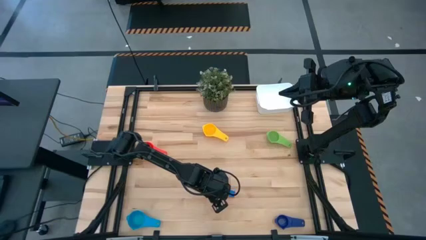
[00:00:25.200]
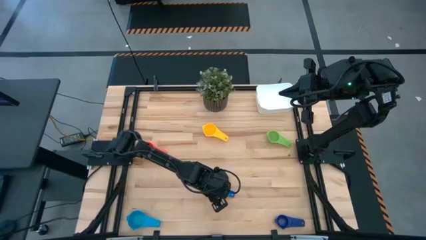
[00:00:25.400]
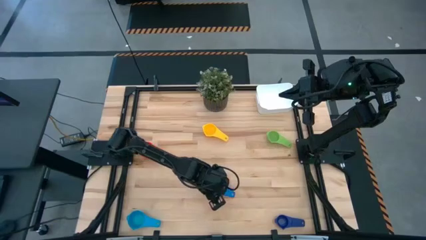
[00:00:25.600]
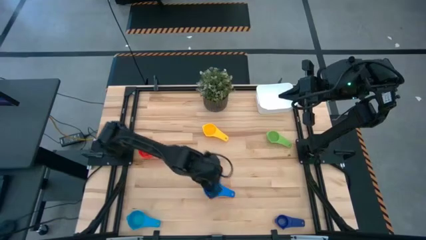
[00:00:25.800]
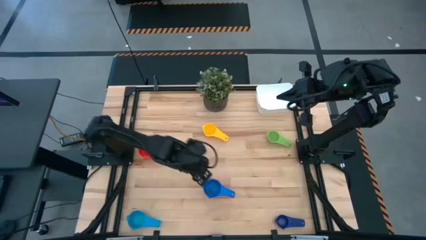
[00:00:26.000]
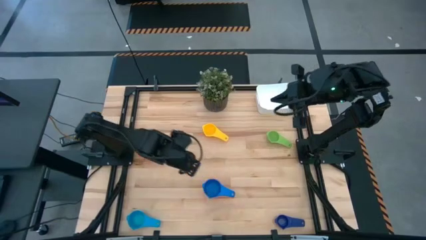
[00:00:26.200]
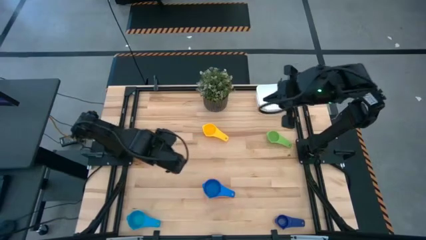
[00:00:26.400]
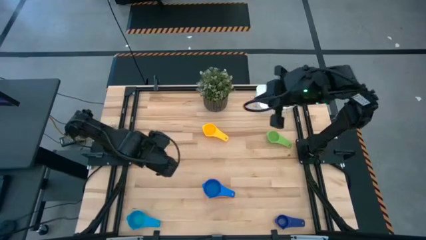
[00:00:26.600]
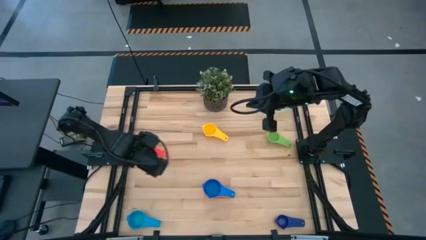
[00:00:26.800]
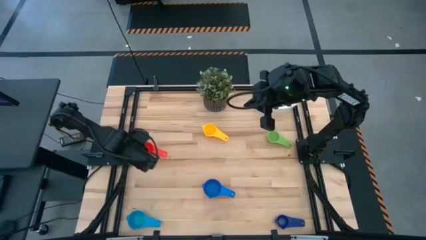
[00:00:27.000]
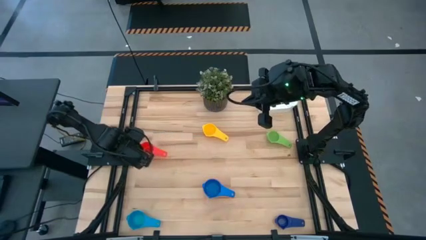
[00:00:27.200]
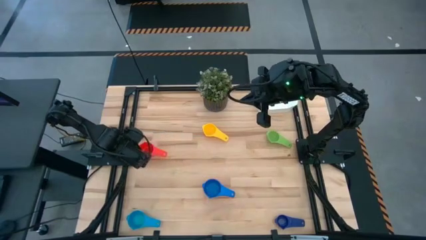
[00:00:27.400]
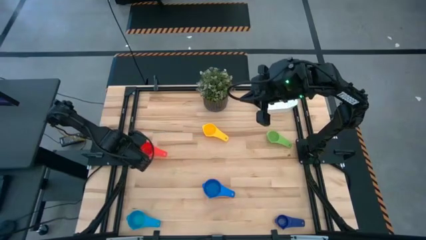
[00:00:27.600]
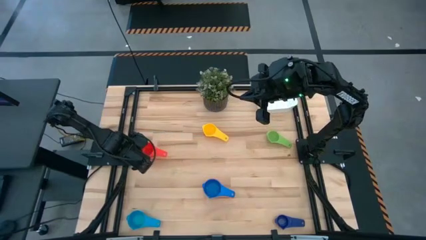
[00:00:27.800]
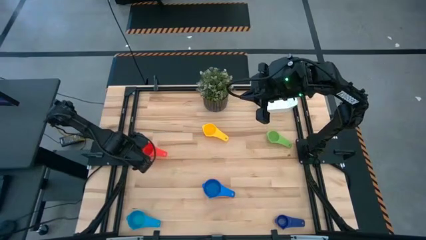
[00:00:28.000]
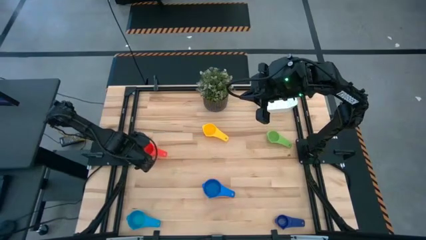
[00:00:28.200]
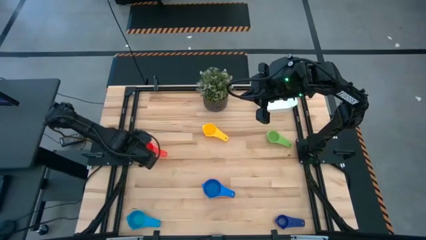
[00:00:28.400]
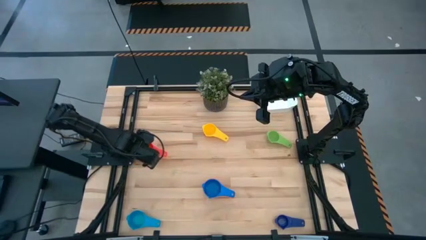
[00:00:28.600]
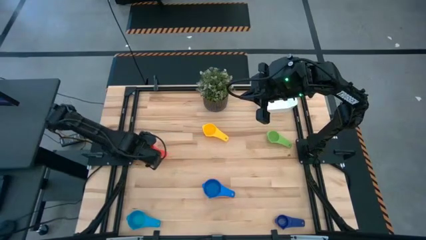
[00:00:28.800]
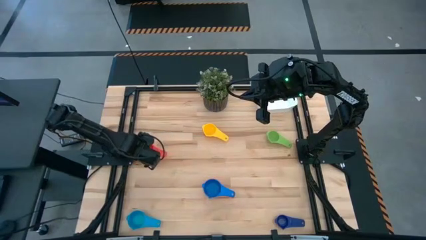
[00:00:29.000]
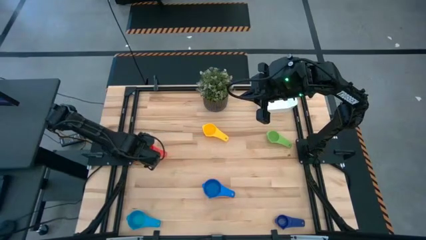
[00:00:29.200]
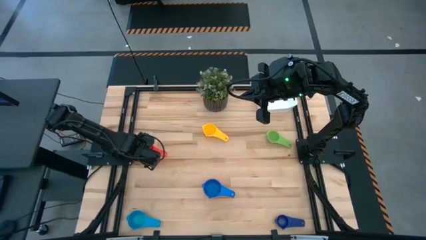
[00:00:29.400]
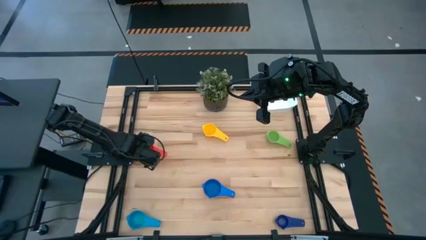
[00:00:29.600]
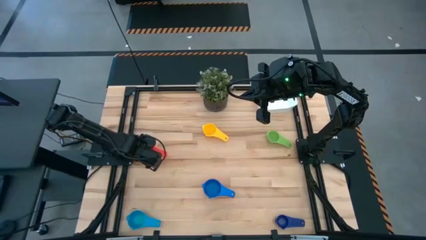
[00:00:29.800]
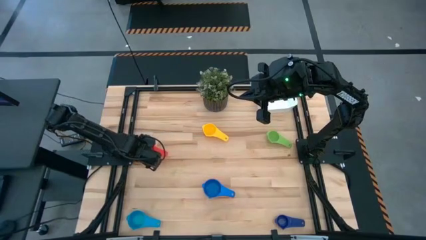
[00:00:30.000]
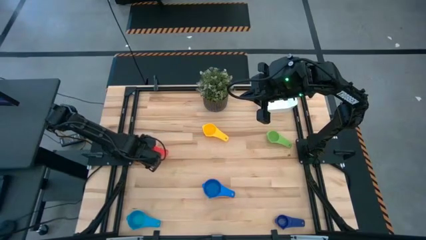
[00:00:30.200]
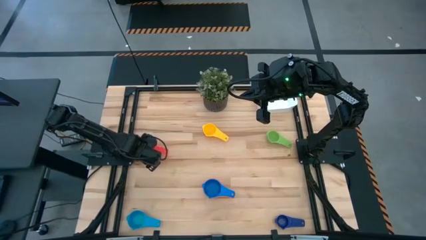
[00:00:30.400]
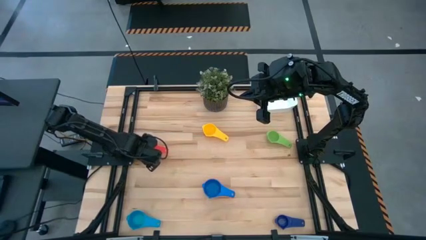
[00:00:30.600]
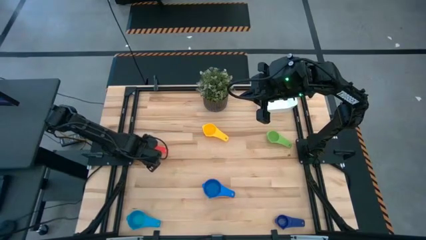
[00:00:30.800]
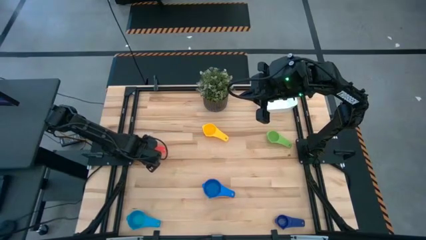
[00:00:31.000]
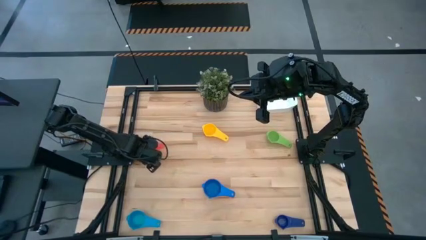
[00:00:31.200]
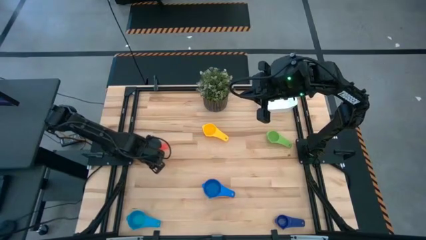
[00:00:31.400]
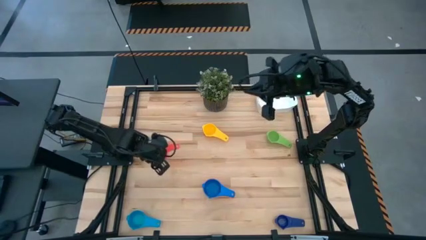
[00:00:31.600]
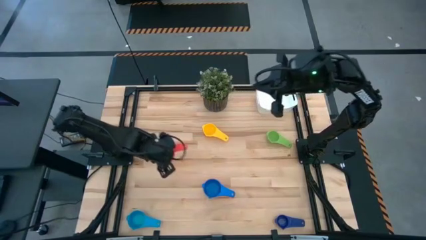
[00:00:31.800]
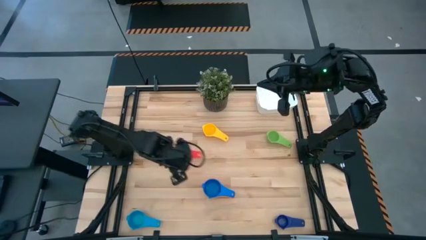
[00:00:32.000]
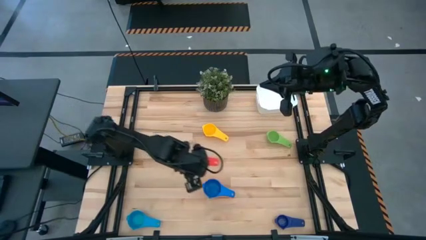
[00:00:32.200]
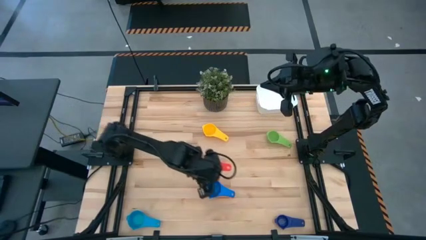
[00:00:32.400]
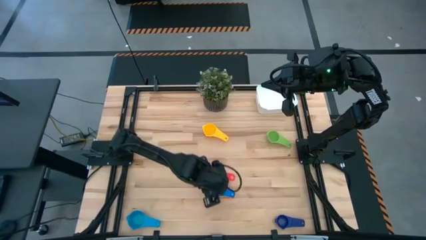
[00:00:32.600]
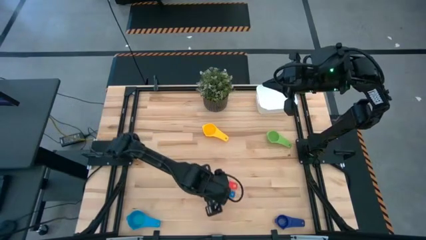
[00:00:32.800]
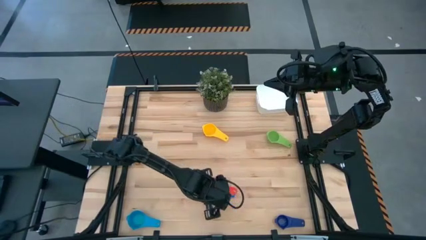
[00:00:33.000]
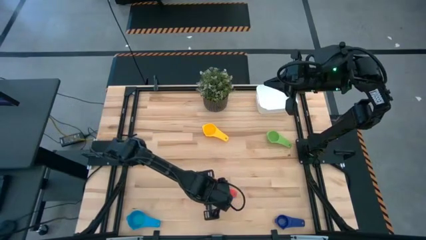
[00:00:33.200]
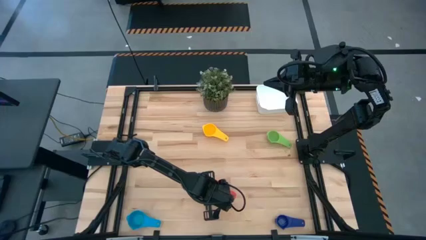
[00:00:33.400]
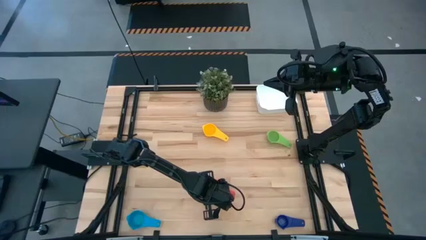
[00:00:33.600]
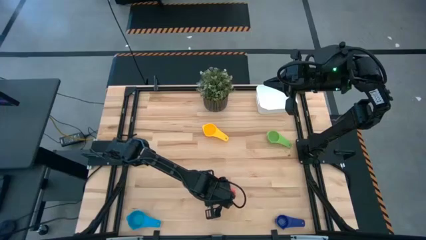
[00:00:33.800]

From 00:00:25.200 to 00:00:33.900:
Task: Nest measuring cups in basket
Stack the red measuring cup on top of the blue measuring cup

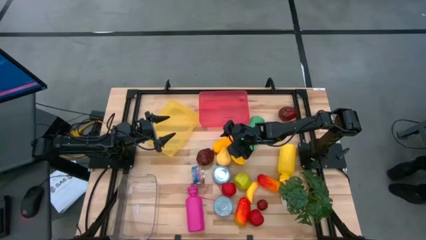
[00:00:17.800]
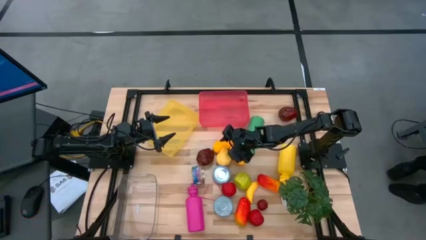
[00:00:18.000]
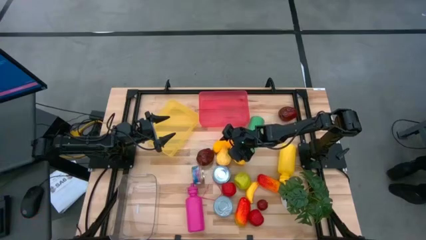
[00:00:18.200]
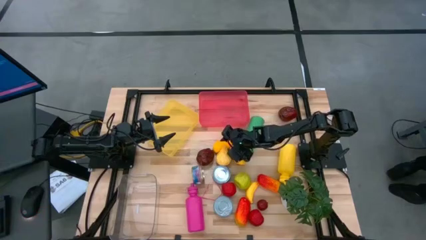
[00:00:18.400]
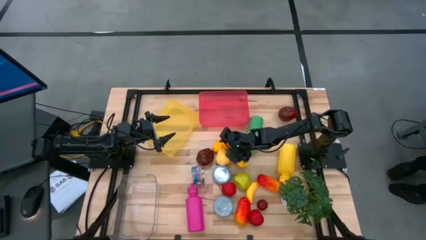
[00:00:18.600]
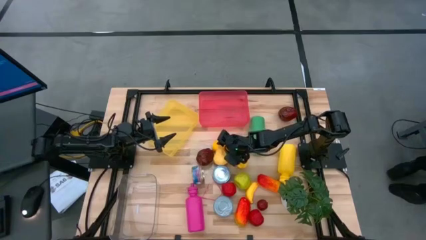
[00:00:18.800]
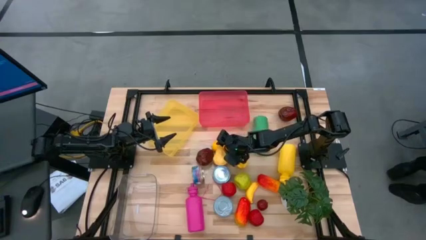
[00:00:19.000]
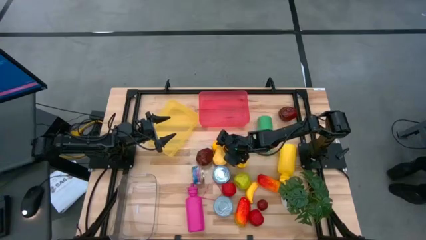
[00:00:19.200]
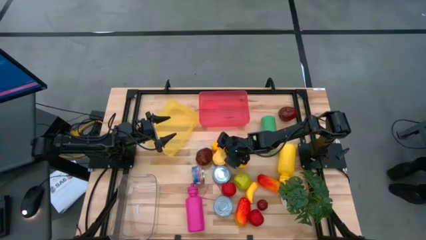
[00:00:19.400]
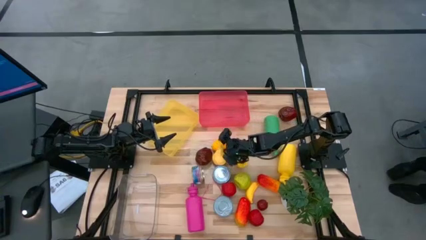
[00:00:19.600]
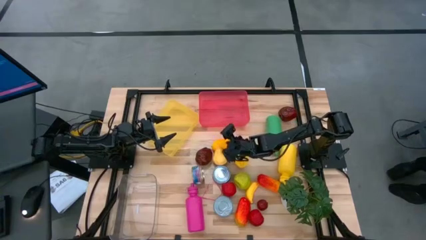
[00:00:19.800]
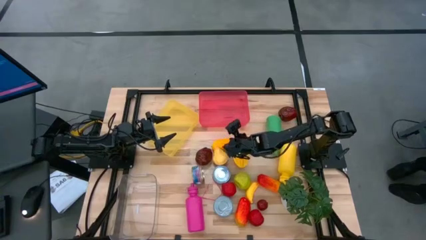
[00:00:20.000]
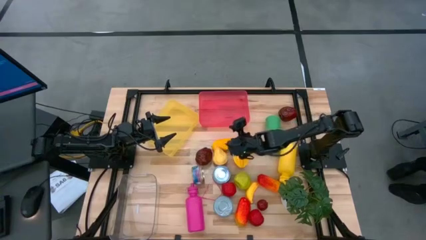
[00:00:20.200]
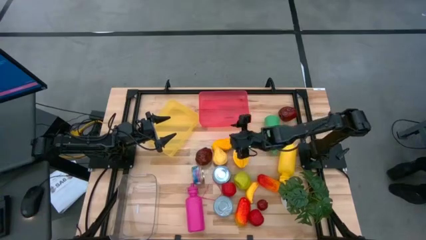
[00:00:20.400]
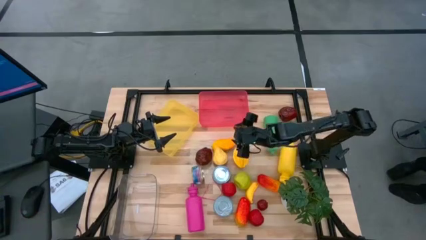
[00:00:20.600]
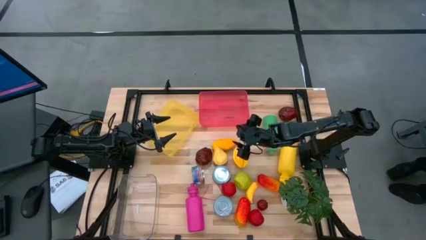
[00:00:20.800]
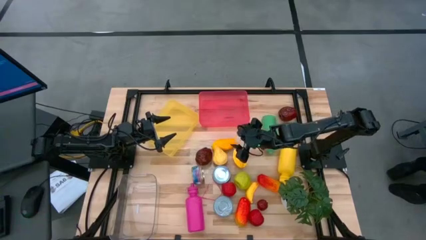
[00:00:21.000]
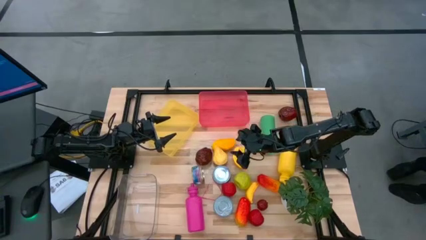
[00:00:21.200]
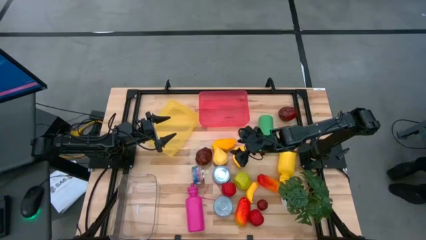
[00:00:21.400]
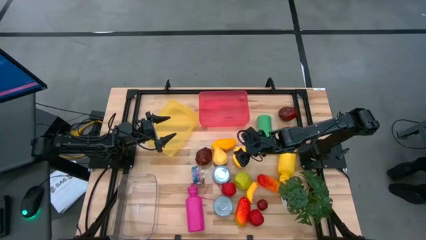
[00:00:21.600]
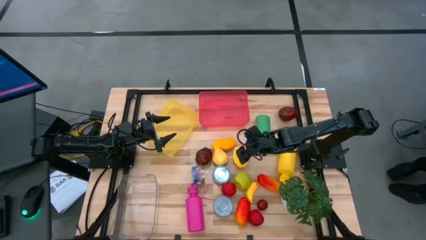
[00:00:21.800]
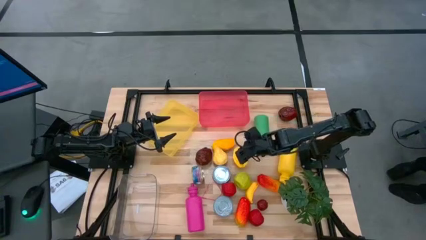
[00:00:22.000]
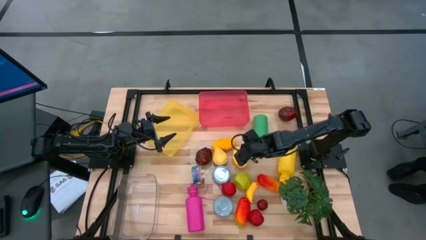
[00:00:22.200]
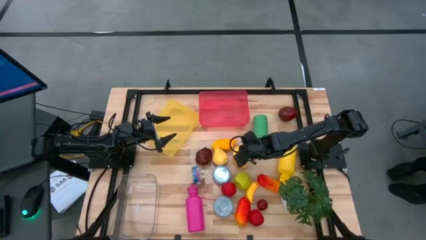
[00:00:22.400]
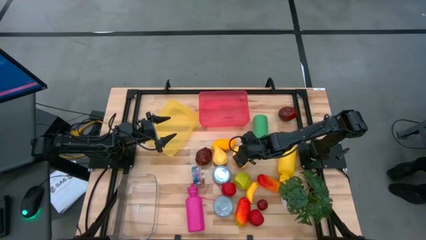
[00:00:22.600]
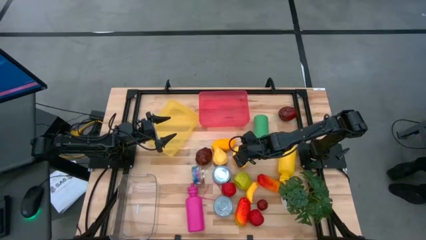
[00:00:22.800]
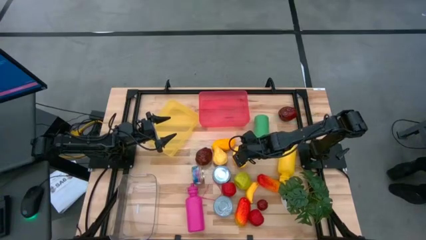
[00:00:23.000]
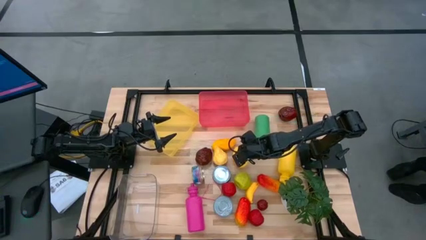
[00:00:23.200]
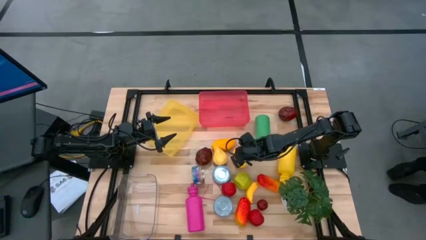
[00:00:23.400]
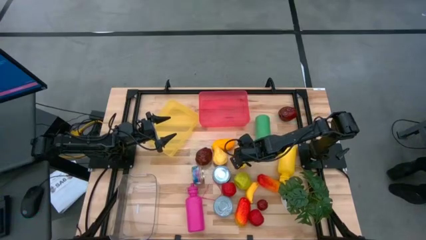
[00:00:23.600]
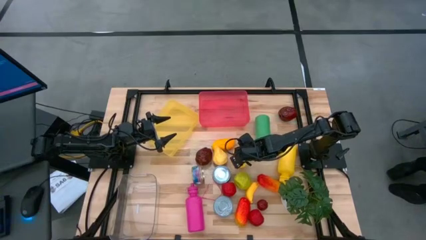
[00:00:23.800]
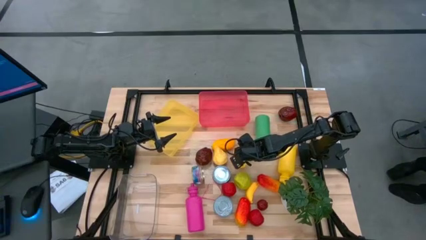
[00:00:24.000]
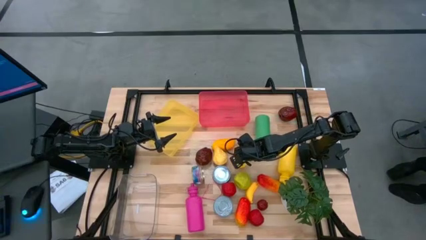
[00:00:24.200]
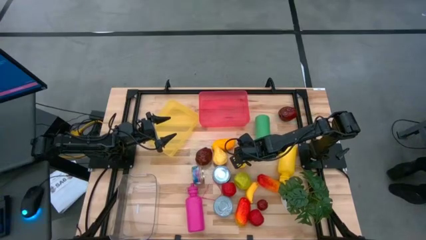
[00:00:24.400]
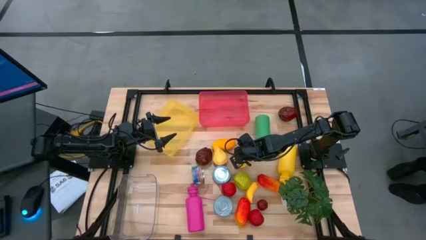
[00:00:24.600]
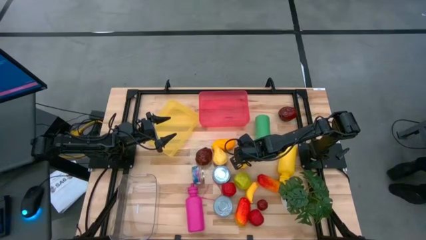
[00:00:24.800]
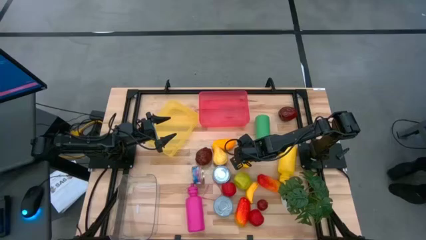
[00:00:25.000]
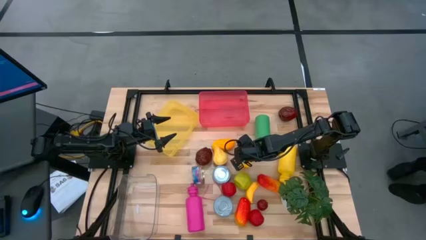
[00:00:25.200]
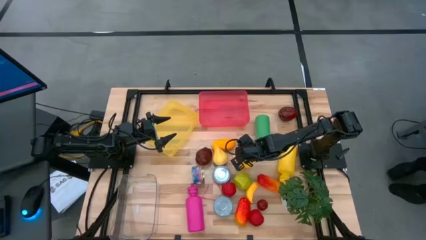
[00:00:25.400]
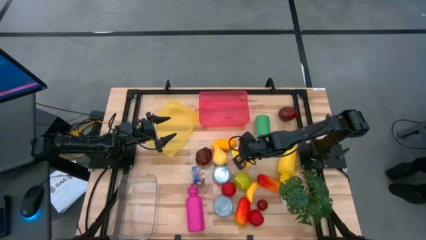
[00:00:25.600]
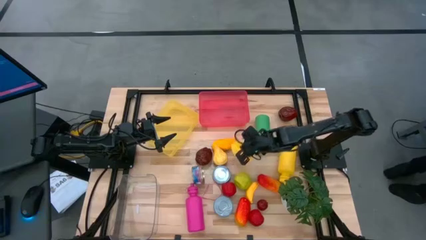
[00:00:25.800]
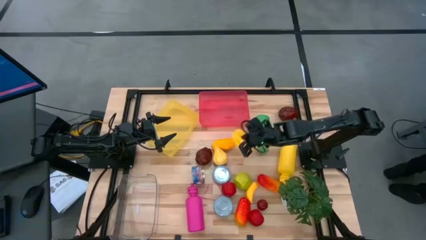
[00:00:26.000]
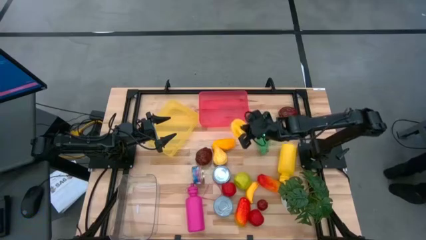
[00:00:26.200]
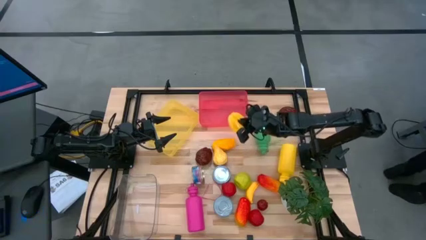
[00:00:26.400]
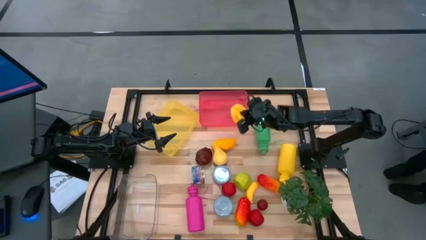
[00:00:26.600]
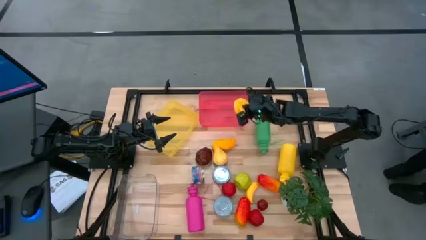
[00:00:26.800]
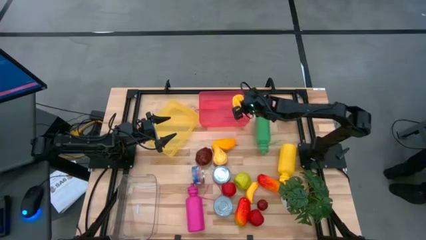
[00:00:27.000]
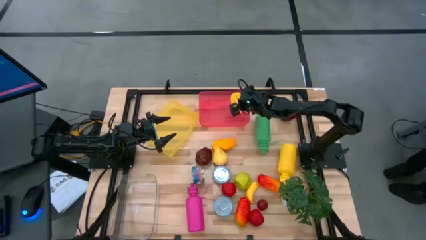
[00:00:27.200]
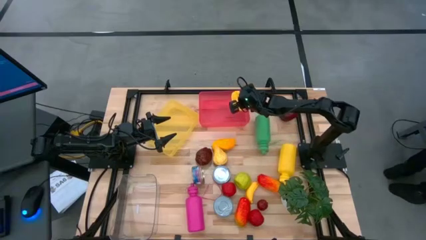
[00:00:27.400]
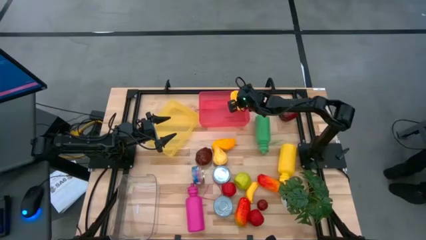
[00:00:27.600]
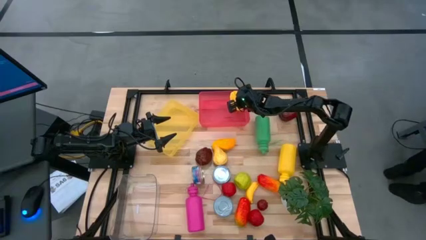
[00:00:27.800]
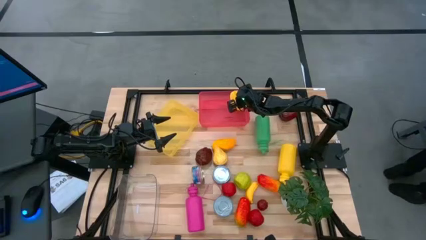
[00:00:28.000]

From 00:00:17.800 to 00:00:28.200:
Task: Pick & Place Food Item
Put the starfruit into the pink bin
